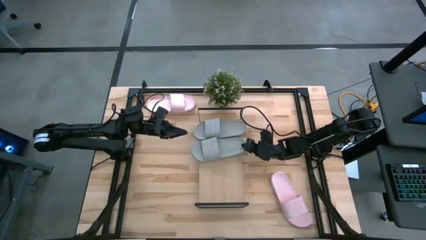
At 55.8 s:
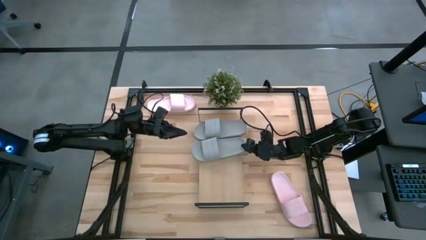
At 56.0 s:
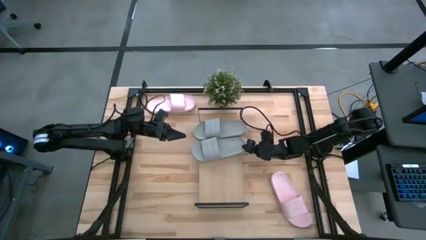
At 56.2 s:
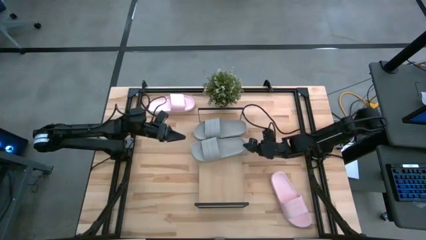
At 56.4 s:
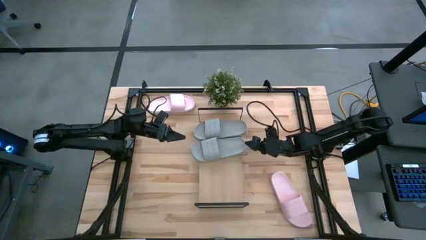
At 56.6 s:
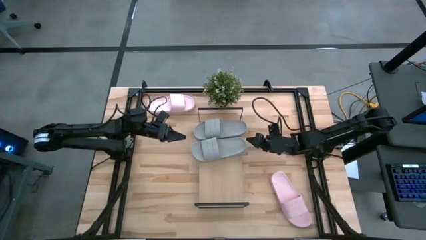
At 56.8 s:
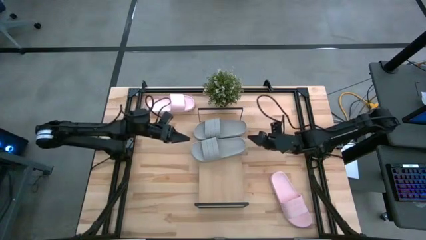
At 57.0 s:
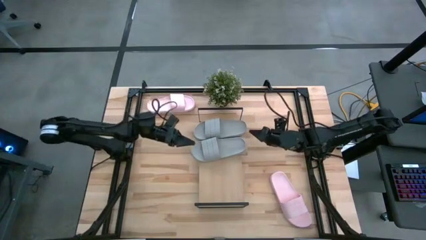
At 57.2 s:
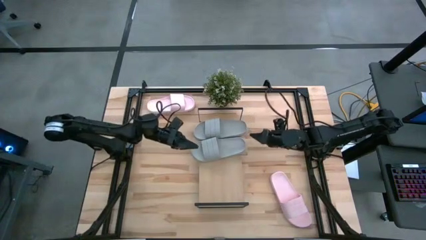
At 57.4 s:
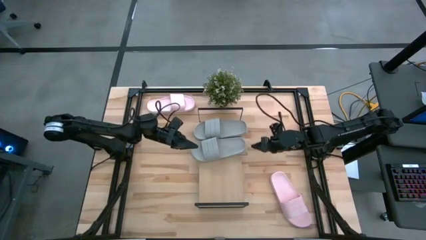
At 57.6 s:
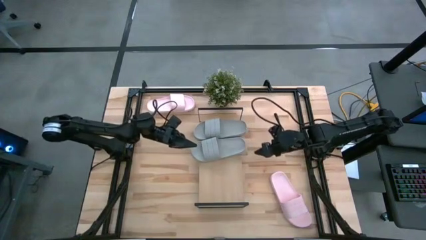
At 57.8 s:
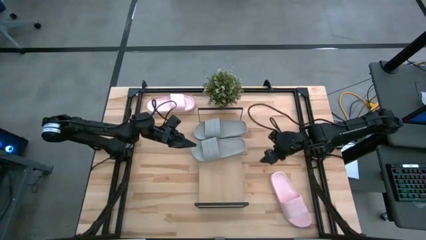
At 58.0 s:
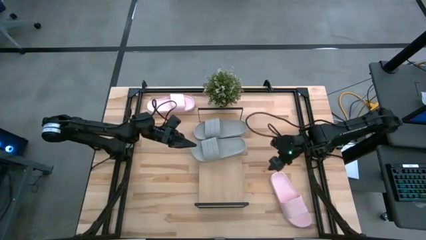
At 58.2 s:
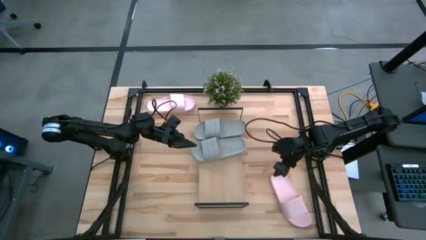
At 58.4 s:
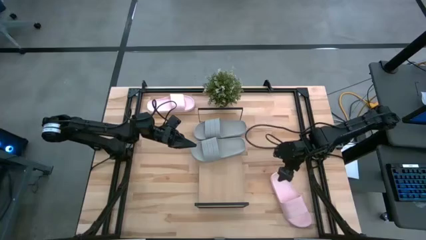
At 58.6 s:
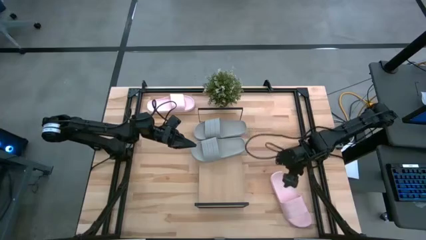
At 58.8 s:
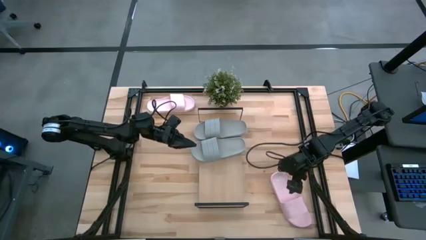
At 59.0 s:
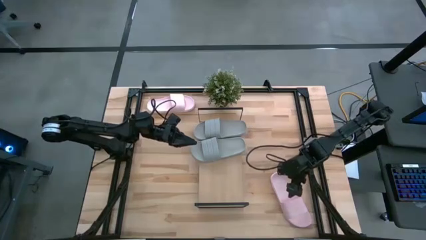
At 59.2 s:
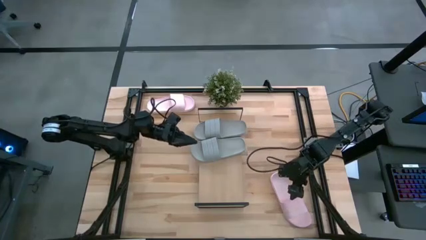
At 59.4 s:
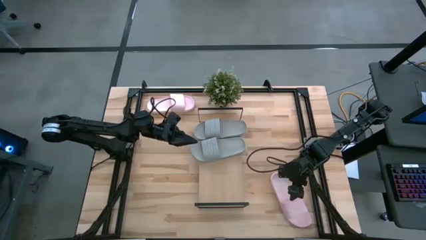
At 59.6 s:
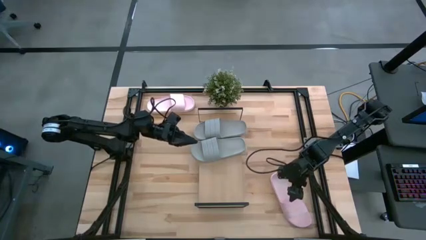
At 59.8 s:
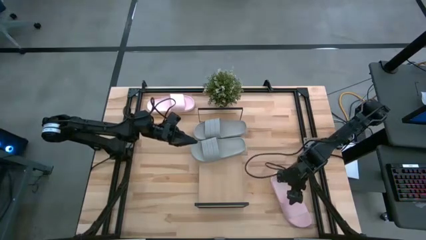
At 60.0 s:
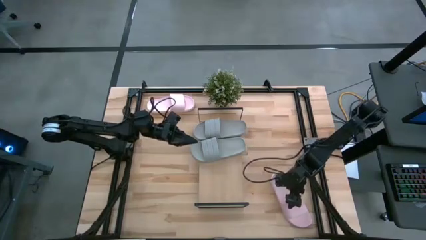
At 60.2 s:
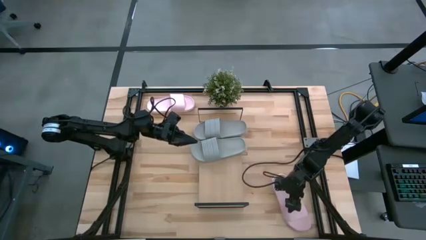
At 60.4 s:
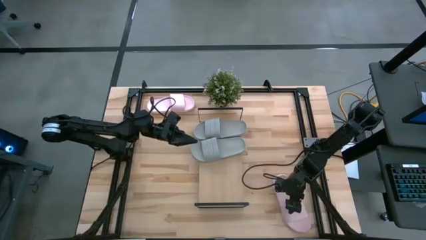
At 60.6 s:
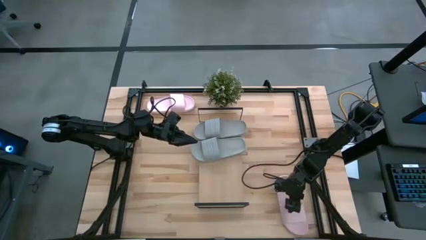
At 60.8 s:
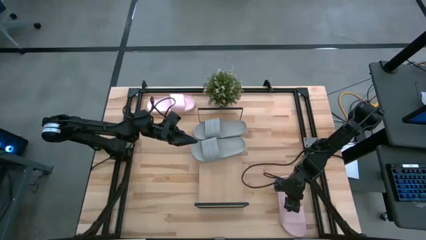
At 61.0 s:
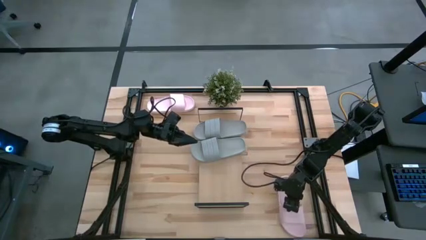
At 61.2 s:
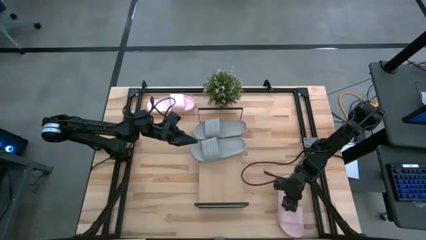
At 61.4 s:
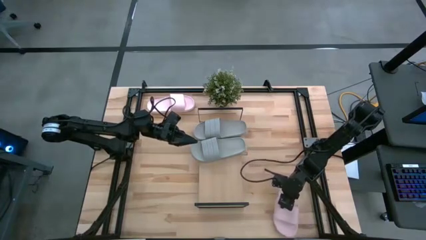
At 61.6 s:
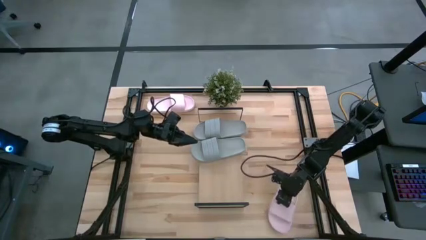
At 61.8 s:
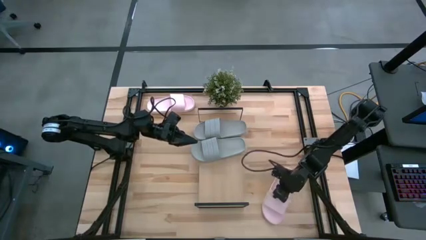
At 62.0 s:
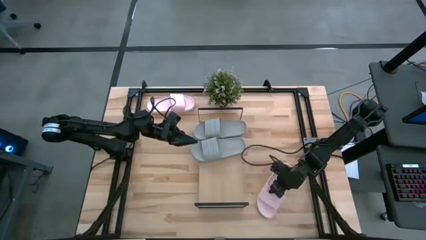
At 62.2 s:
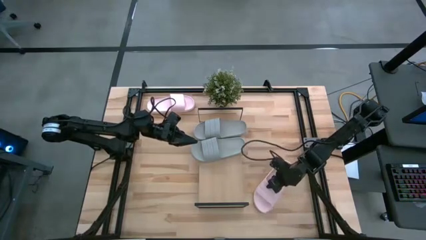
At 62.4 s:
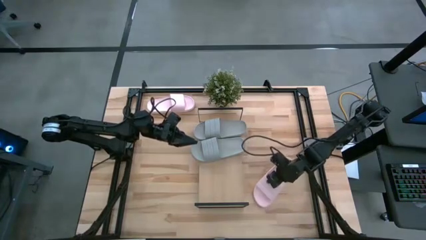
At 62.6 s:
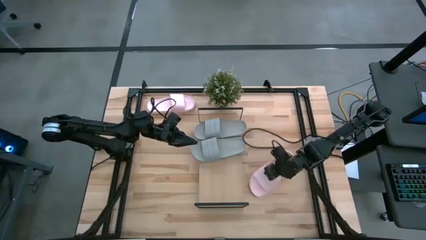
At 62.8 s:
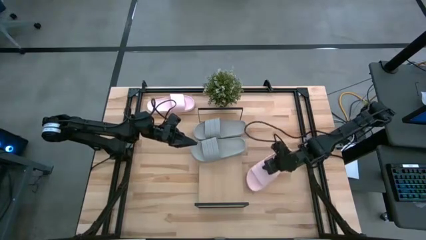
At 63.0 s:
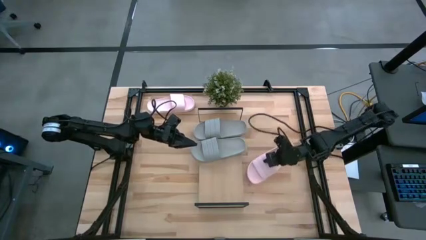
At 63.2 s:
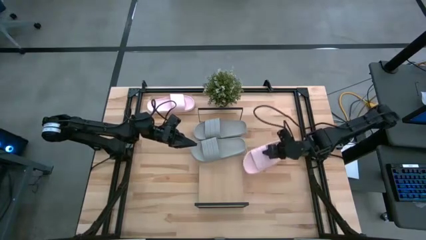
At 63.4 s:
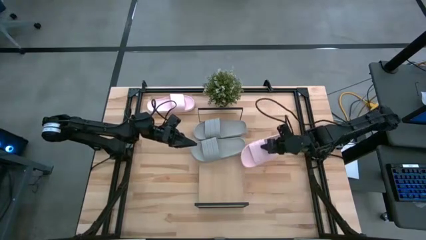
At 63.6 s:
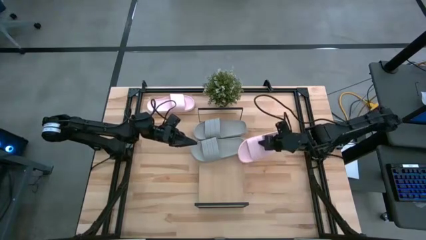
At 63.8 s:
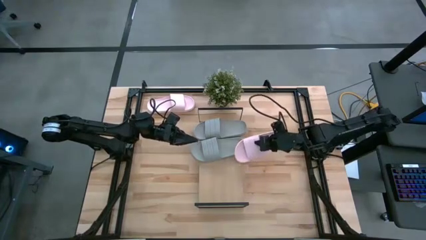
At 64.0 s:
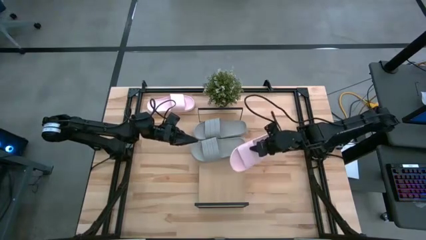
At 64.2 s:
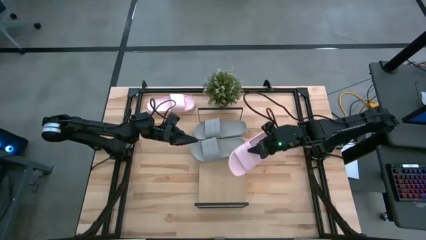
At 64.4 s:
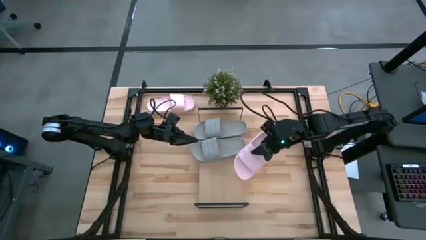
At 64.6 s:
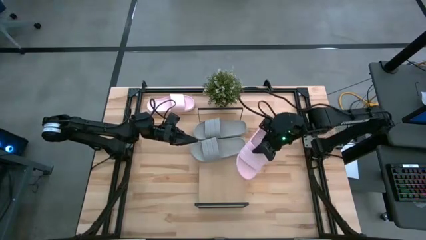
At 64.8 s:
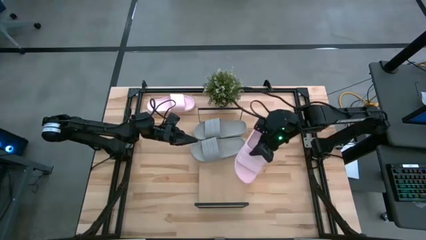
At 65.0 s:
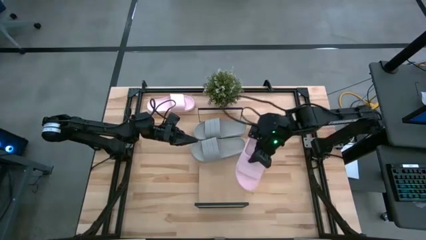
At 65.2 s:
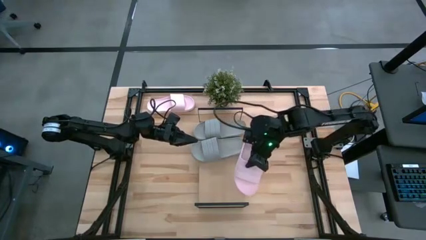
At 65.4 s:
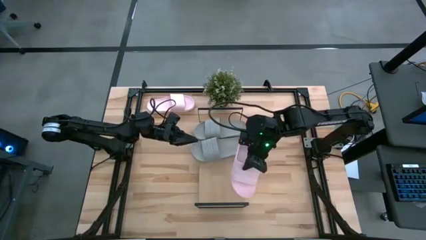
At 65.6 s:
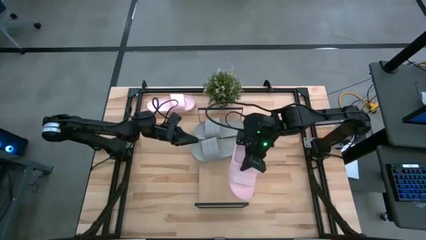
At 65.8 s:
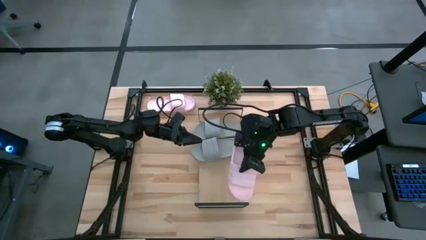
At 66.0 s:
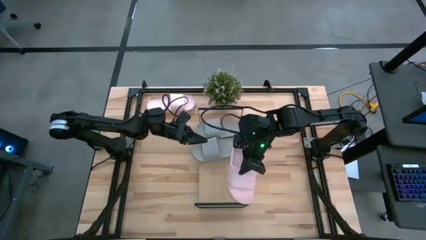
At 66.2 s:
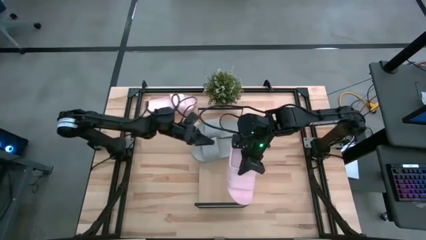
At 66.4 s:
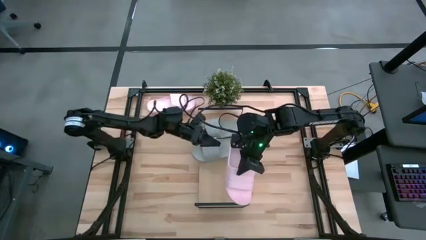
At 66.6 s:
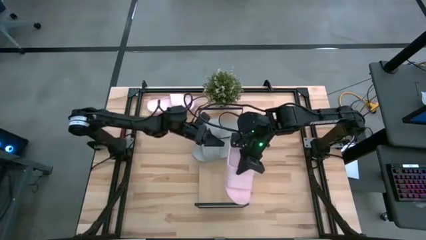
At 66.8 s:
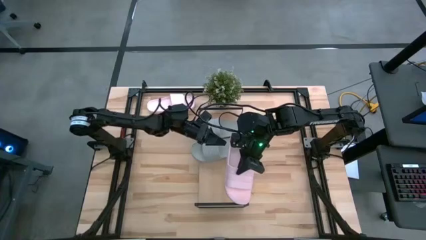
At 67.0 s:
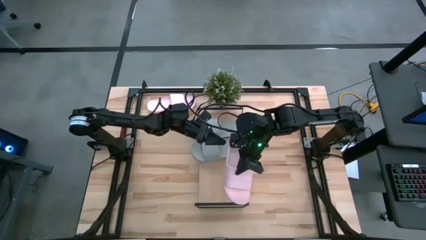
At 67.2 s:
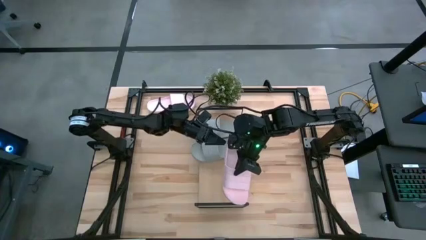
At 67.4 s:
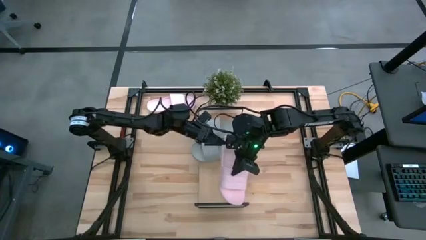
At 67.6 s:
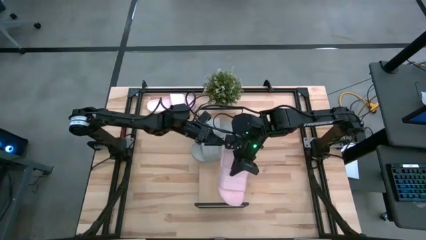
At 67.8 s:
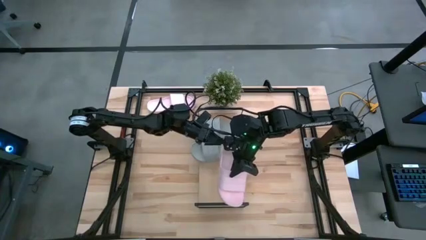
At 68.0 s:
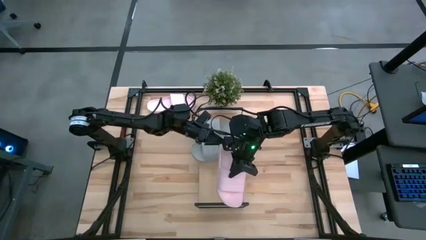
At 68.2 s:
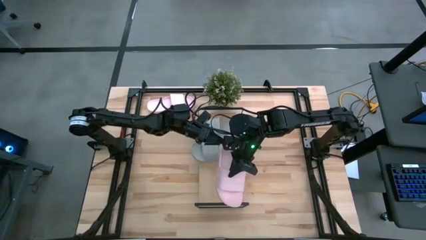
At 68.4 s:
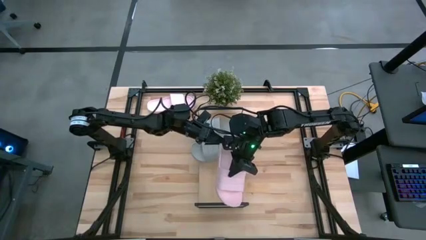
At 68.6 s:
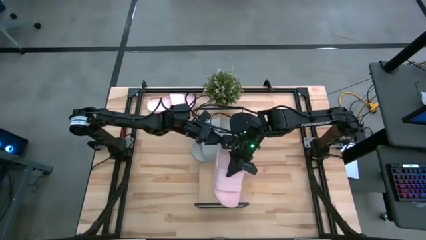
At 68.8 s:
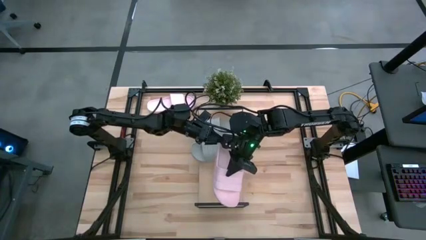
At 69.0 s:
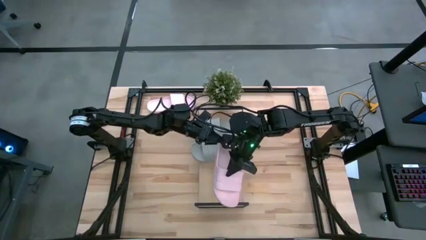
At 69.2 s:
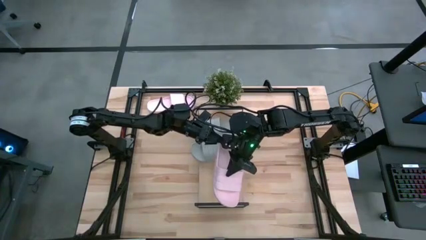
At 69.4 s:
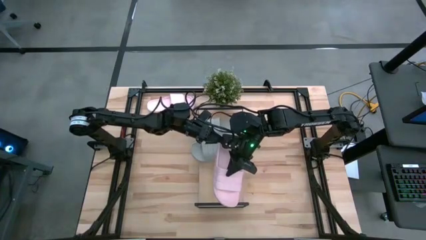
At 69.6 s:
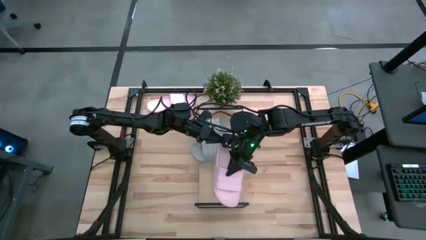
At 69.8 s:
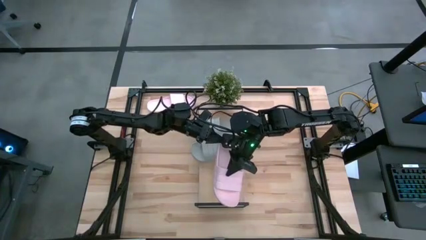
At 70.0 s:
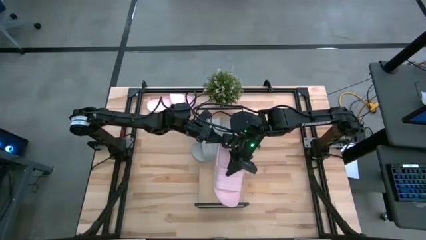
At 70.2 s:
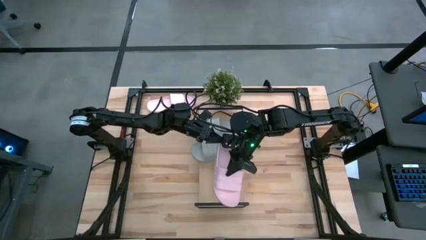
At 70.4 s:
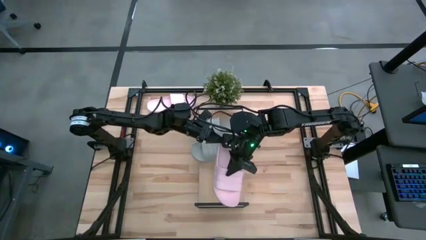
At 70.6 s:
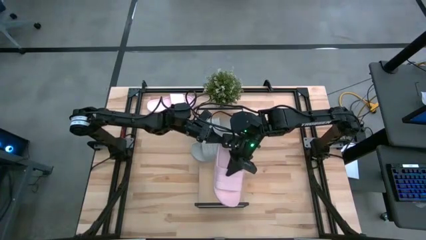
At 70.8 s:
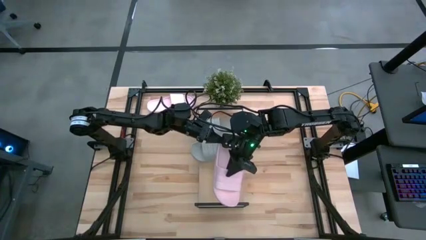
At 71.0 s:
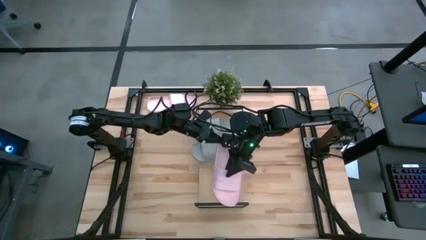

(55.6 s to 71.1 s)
Task: Pick and place slides into the shelf
Put the bottom pink slide on the shelf

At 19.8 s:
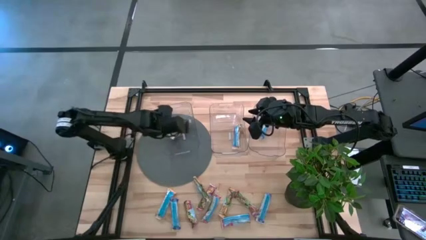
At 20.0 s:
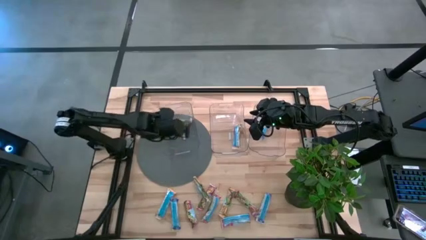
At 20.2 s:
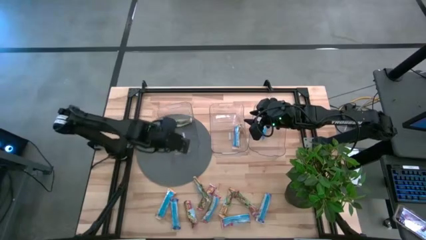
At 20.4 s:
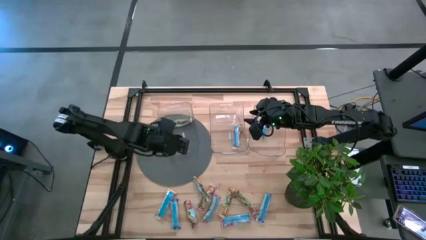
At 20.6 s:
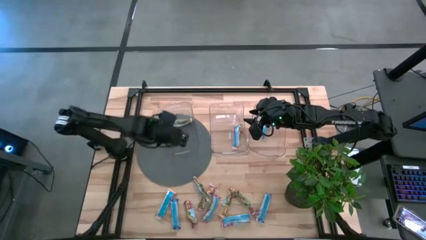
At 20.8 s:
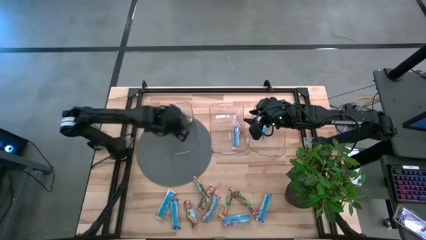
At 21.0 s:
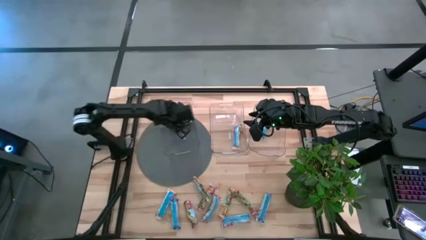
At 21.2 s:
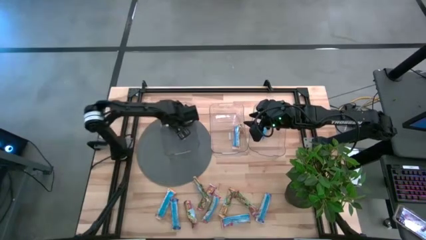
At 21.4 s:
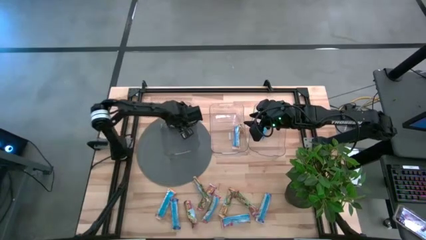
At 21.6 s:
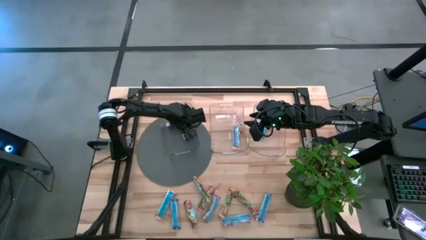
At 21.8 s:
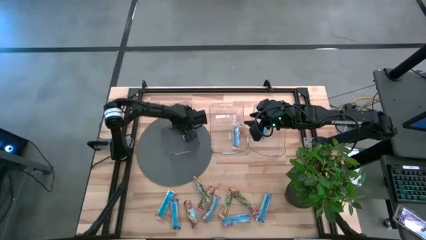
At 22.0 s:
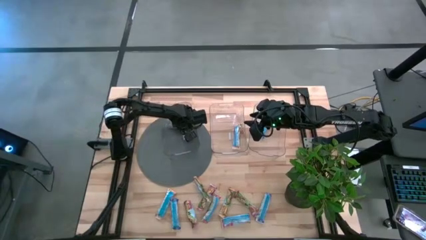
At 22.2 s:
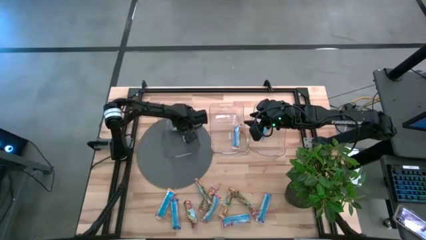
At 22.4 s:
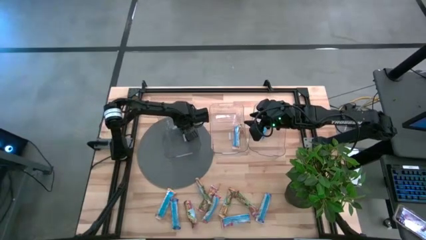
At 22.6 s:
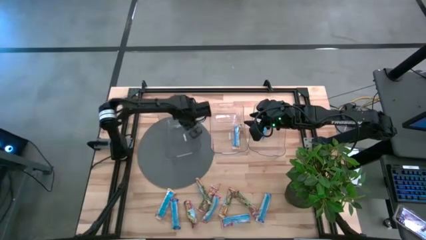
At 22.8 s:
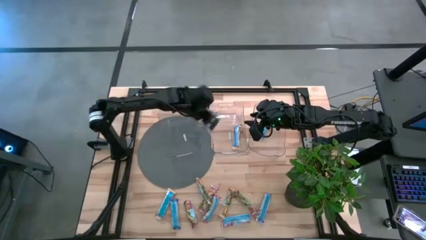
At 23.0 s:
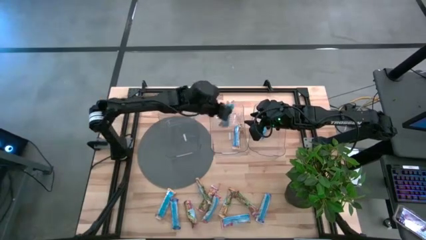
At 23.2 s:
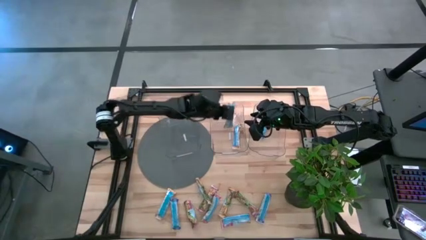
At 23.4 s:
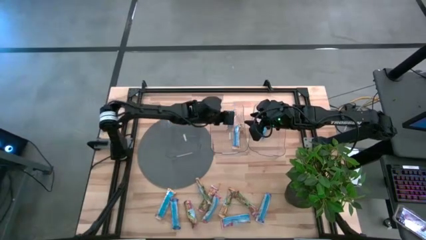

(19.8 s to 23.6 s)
Task: Pick and place Granola Bars by type
Put the yellow granola bar into the middle transparent bin
